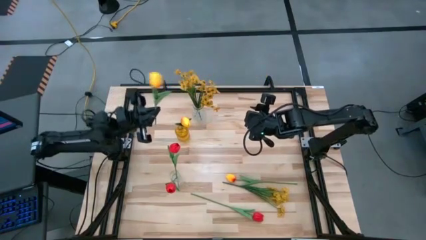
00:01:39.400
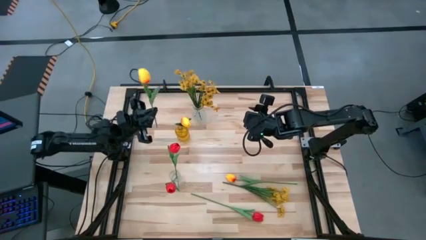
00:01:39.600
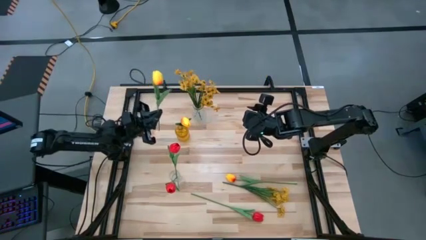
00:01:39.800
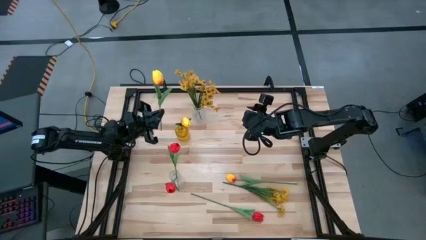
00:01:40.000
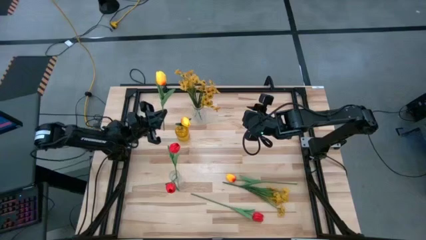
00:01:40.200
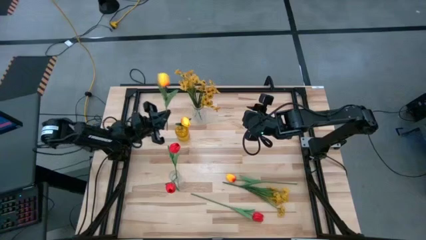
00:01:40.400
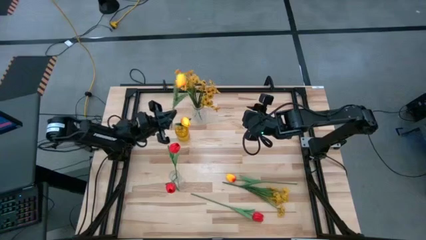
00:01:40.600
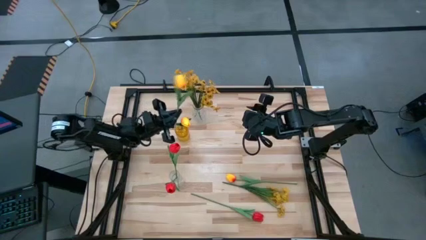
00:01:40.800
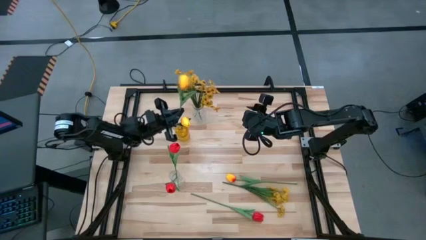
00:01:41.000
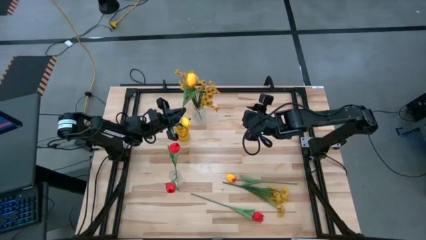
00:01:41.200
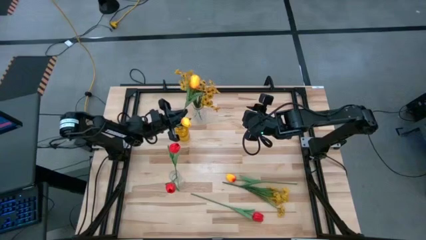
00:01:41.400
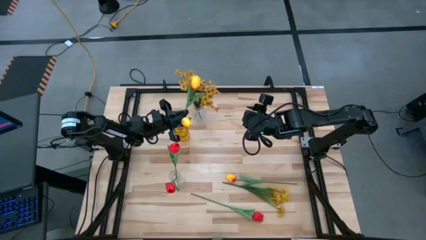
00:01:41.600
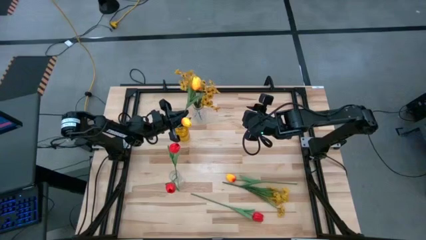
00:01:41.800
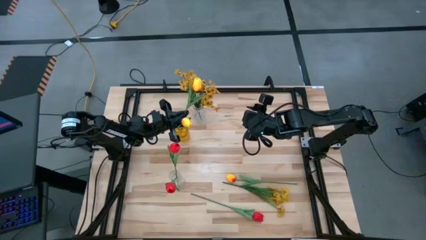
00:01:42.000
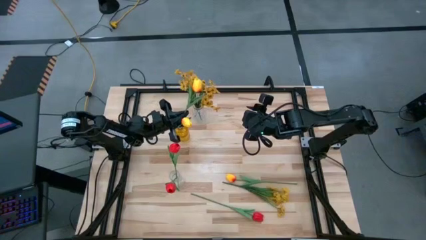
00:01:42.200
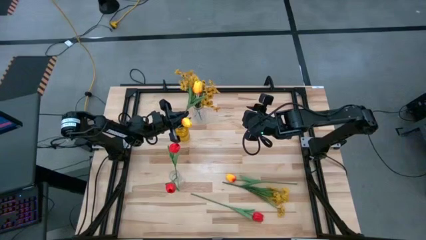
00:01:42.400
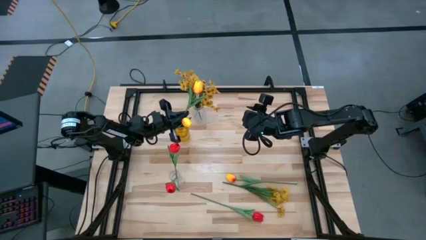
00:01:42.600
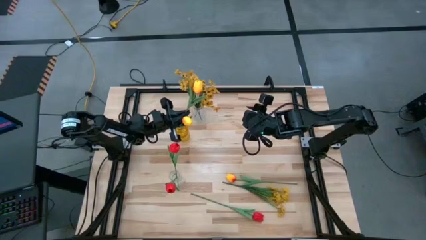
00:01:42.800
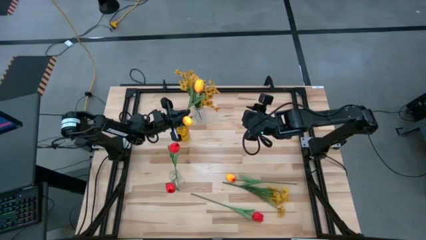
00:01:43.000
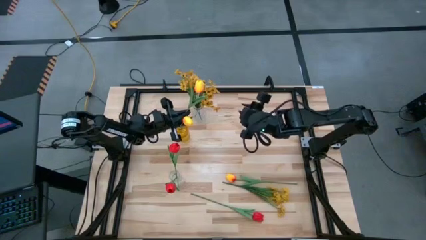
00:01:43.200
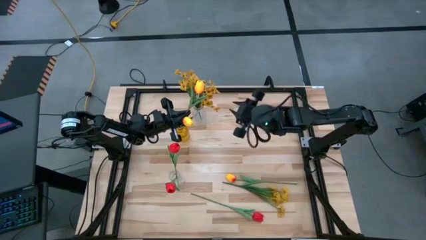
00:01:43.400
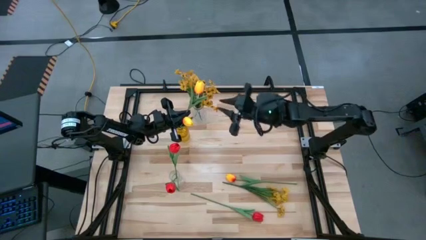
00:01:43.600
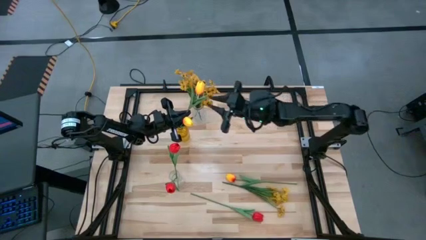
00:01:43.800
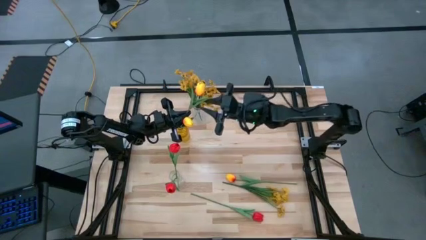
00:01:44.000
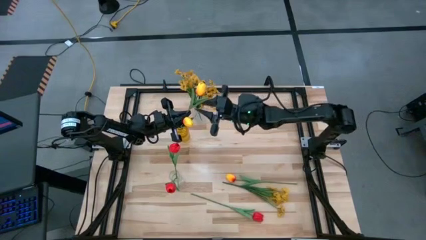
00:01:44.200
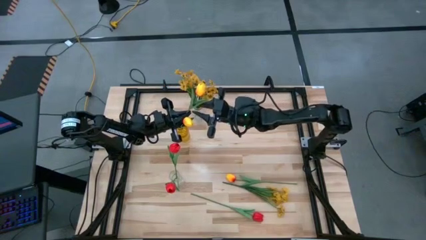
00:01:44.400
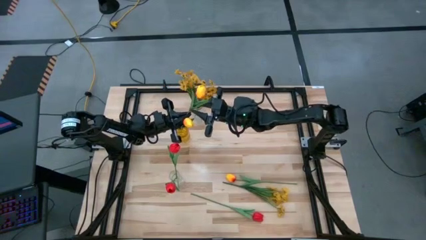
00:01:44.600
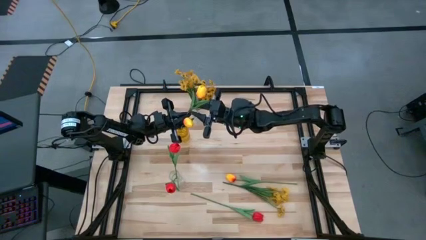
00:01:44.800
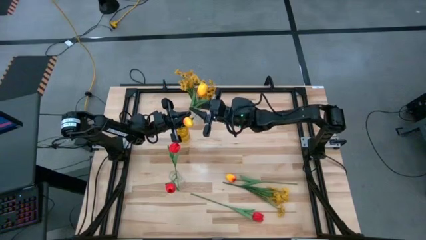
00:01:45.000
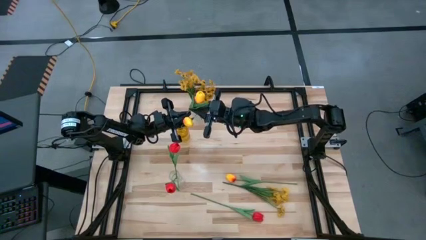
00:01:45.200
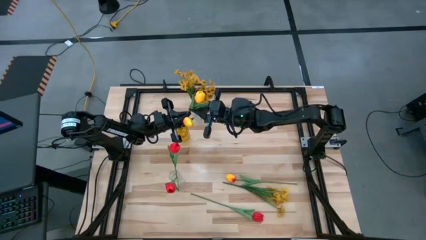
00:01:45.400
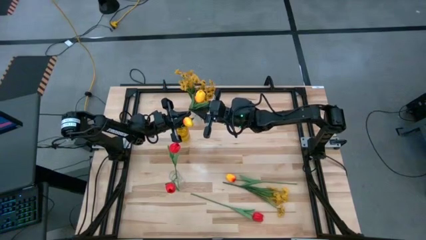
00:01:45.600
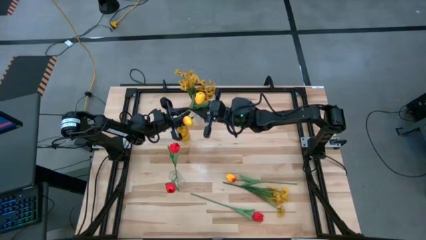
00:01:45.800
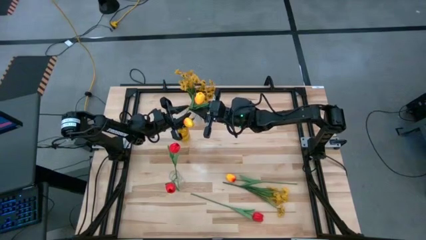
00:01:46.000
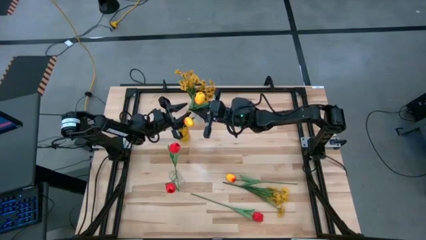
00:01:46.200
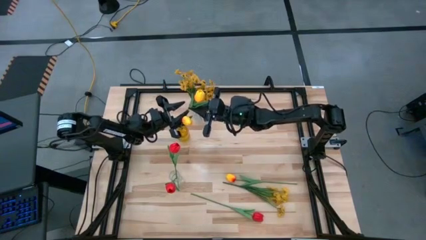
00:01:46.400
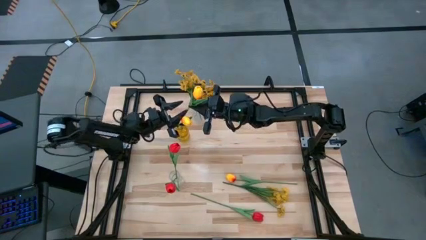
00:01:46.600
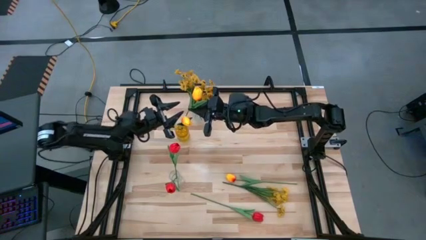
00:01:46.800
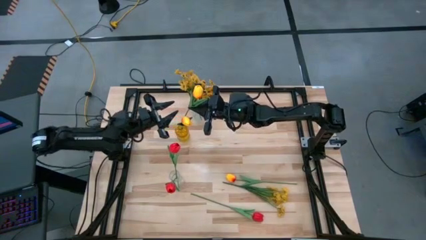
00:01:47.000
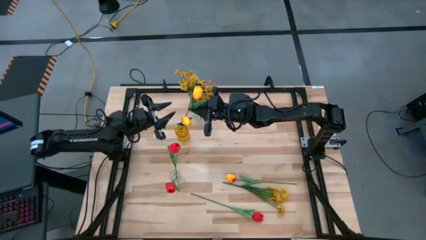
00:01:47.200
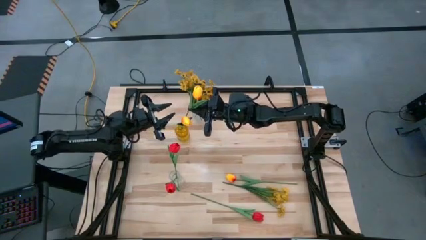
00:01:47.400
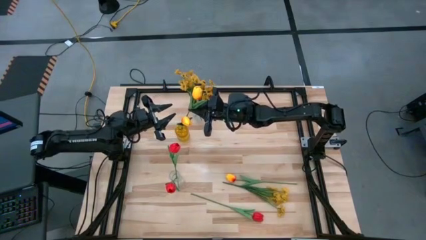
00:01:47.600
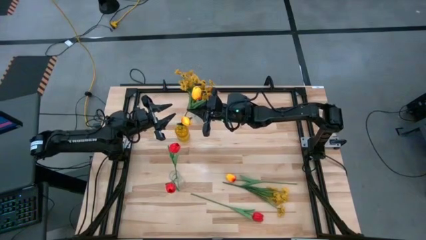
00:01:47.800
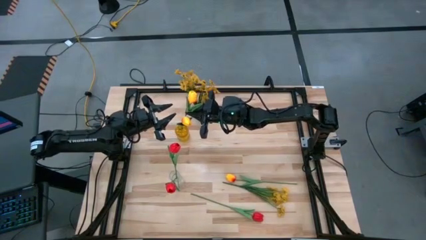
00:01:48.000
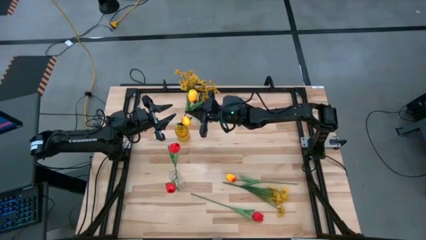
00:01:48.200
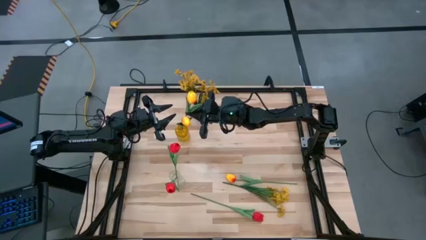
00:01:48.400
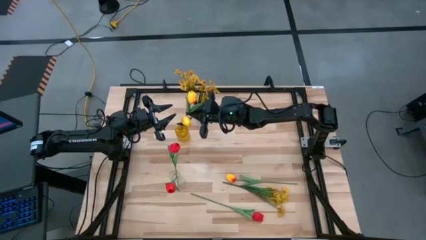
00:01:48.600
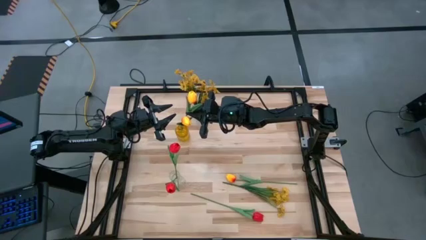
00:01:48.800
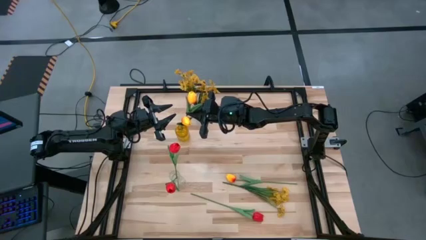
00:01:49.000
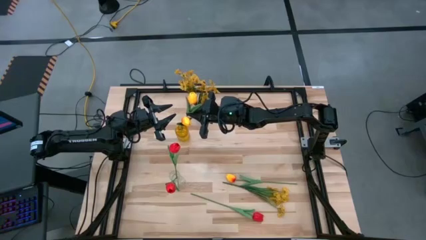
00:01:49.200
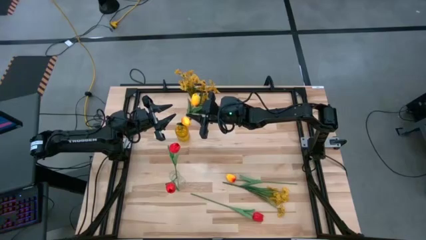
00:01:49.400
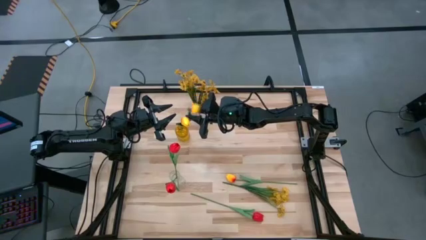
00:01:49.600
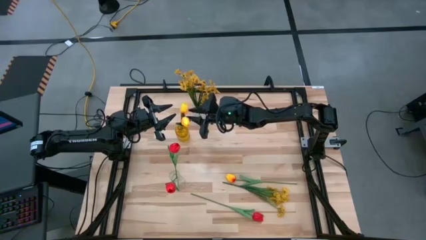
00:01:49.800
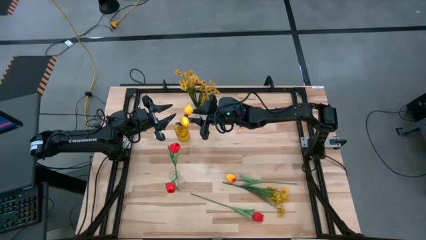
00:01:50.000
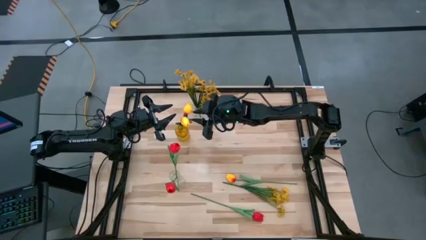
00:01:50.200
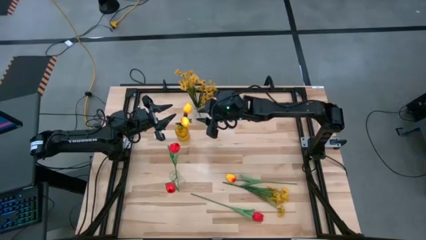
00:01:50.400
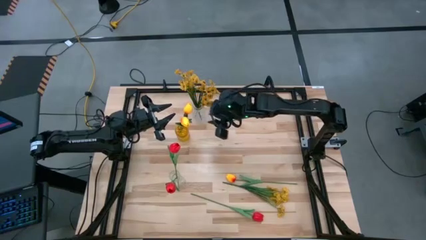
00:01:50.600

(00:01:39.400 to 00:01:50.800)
Task: Sort flowers into vase by color
Put the top yellow tulip into the yellow vase

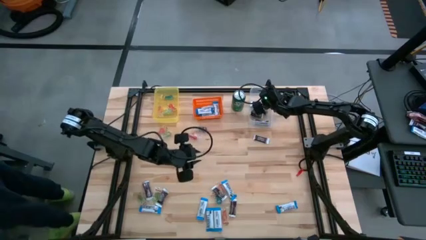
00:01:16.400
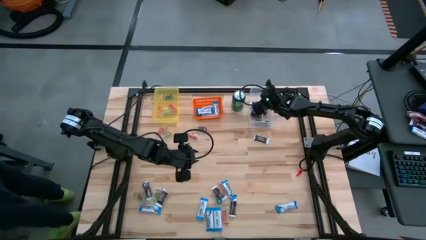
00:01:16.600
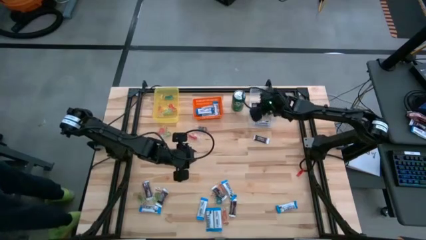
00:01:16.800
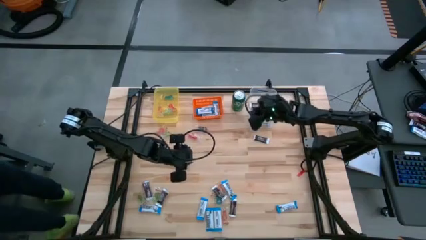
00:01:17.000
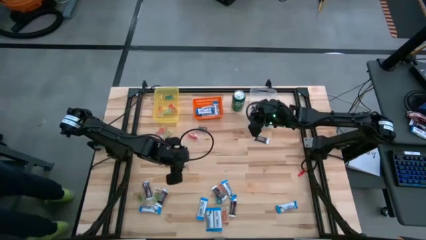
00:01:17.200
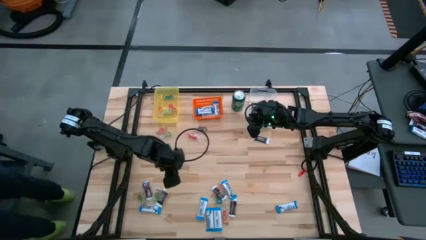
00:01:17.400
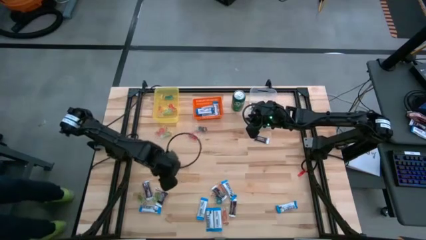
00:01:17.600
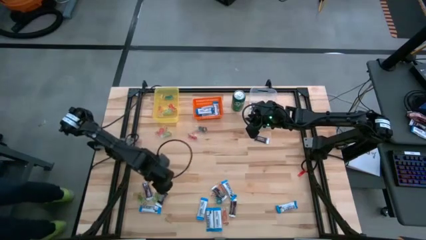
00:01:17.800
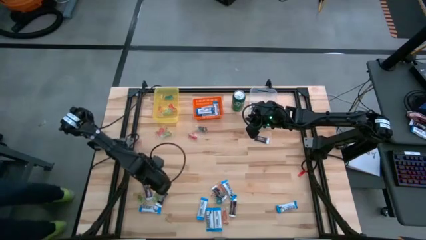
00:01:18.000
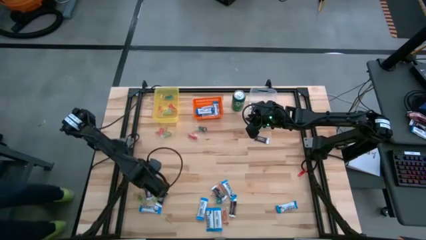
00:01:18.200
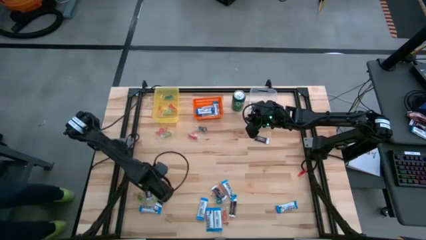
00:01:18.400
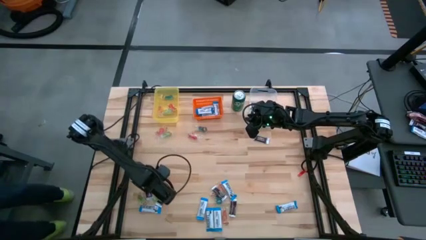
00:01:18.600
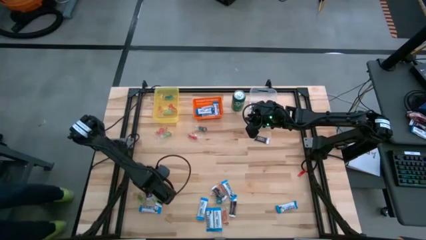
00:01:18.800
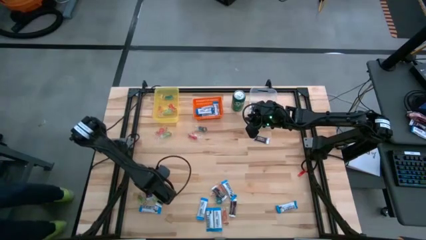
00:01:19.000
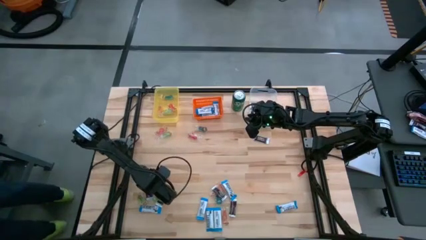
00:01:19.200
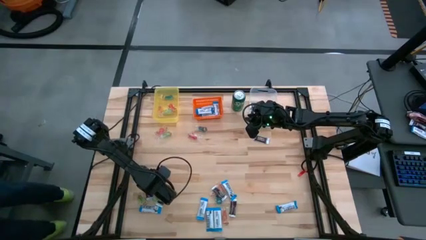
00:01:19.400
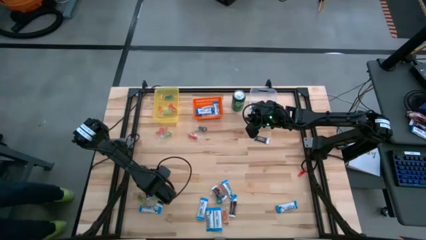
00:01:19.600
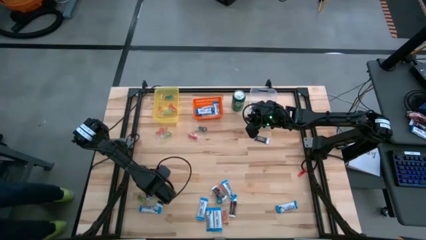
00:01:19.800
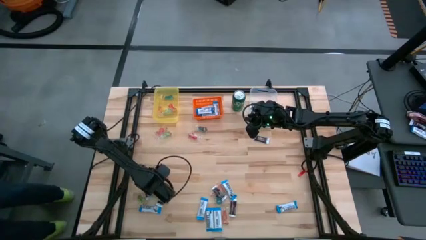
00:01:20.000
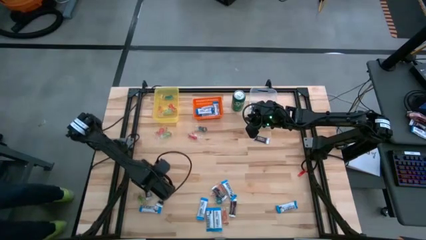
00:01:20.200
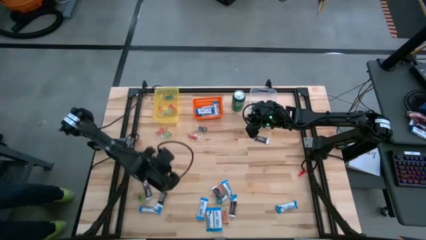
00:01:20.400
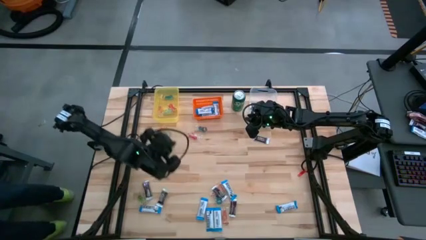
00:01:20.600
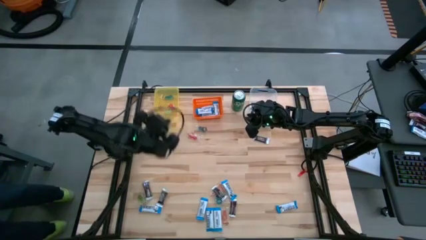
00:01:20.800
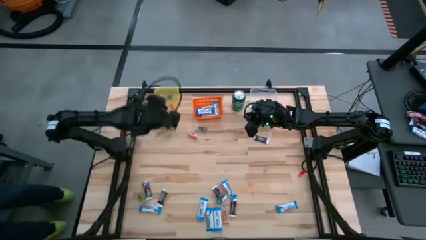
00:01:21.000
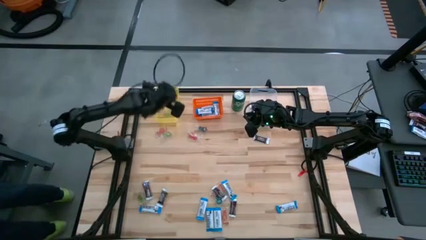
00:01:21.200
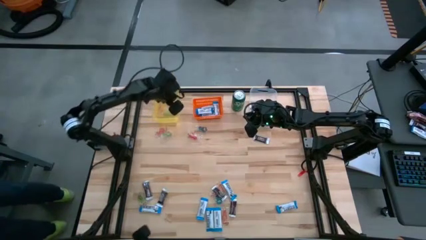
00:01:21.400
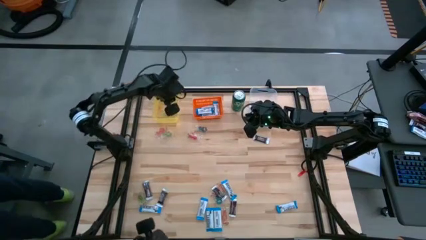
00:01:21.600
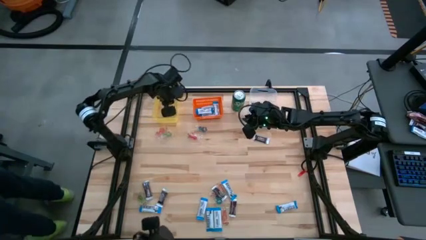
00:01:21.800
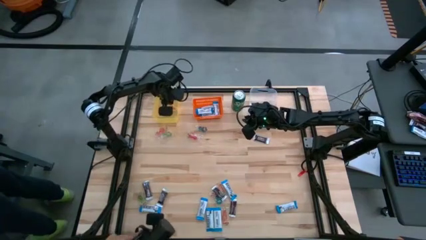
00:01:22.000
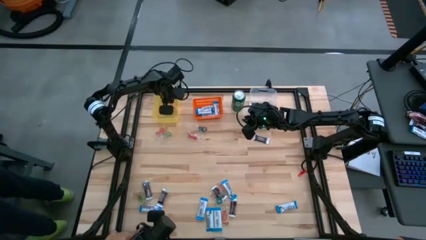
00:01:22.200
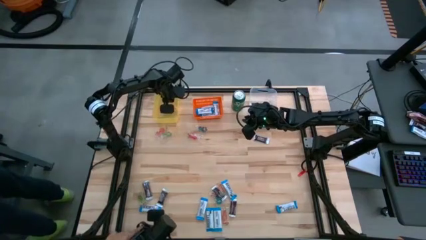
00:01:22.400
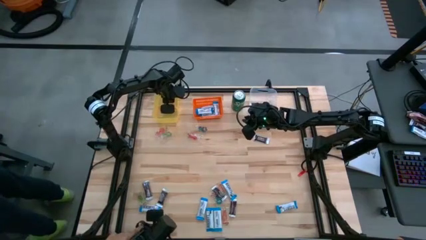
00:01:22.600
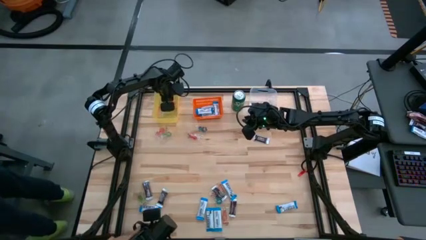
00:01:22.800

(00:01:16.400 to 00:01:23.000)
Task: Organize candy in baskets
Put the green gummy into the yellow bin
